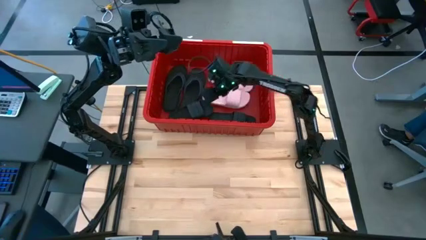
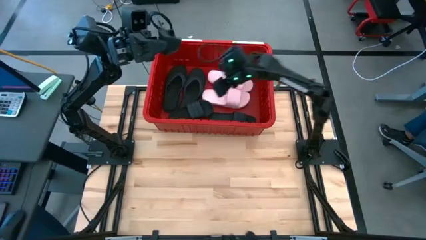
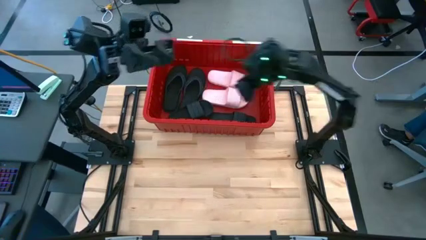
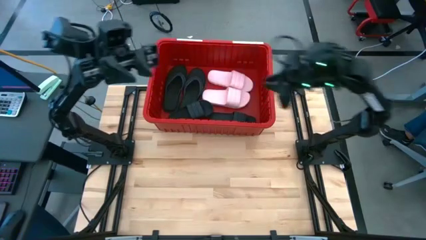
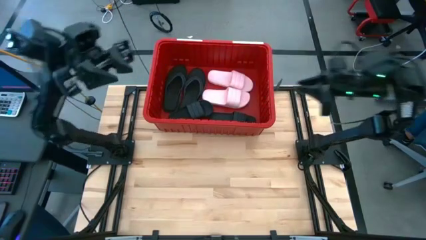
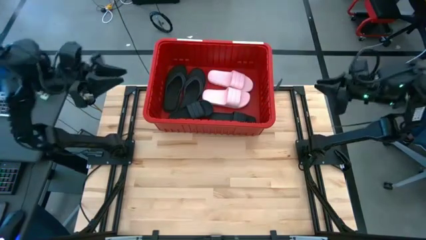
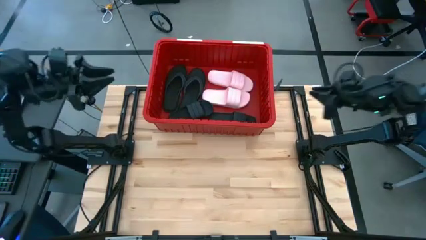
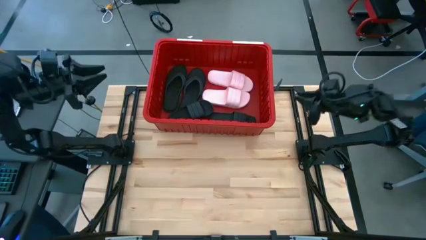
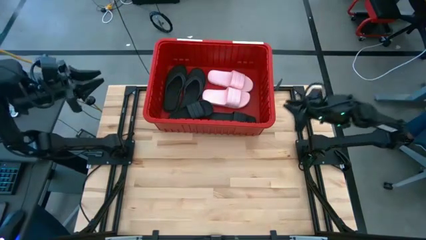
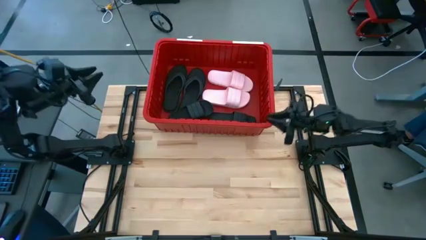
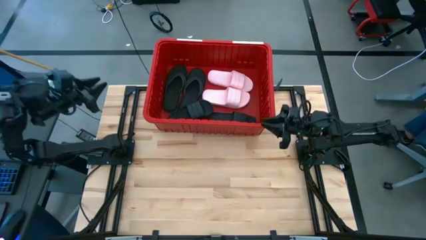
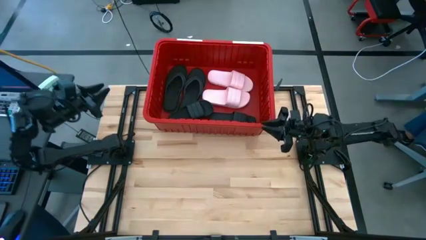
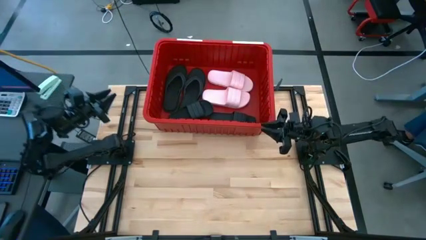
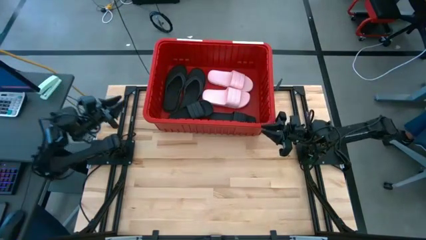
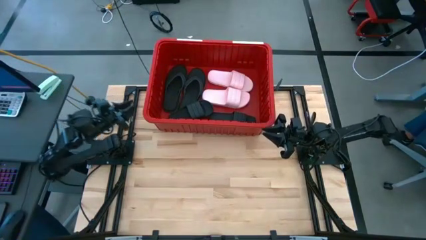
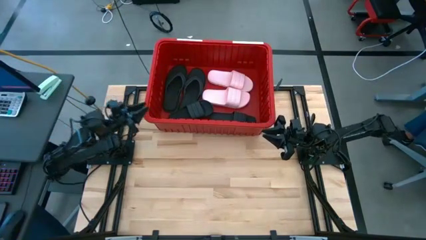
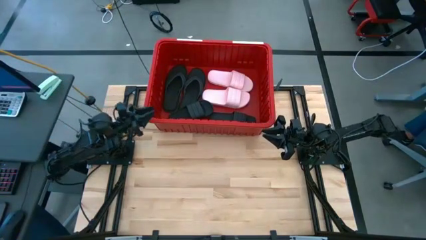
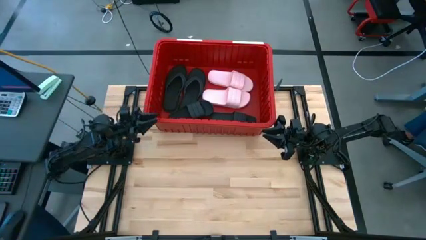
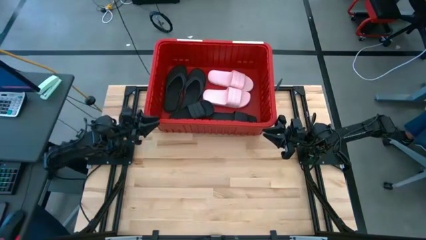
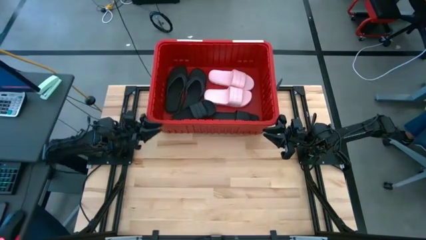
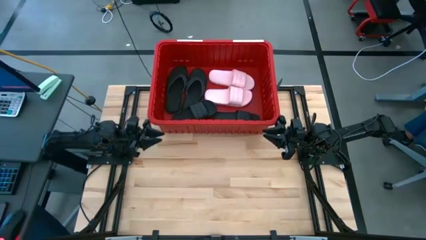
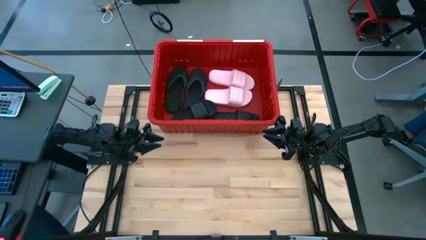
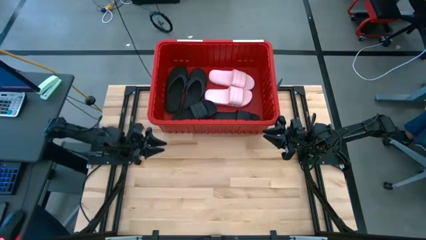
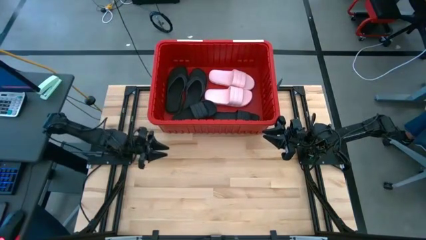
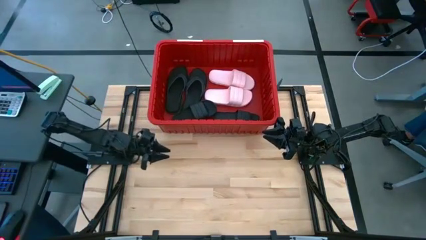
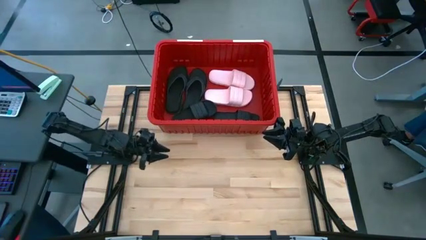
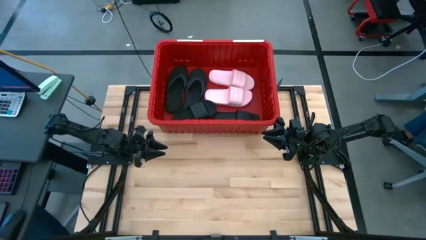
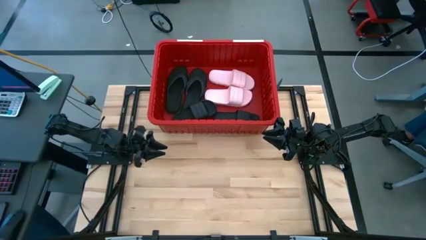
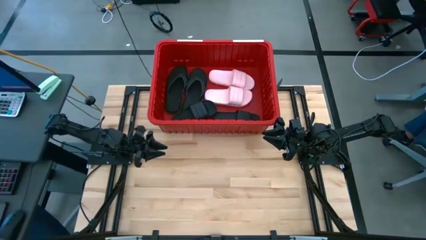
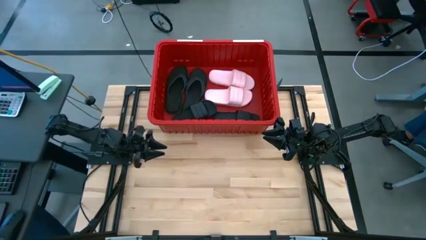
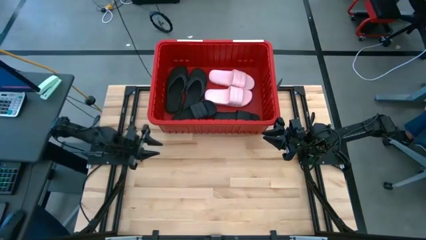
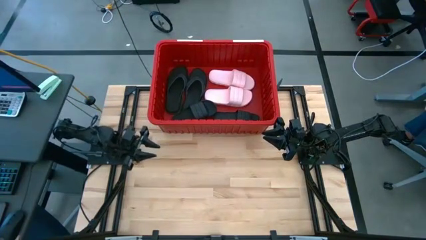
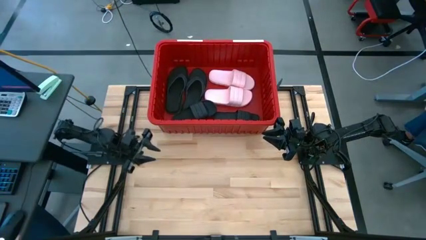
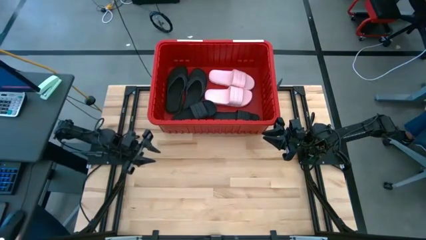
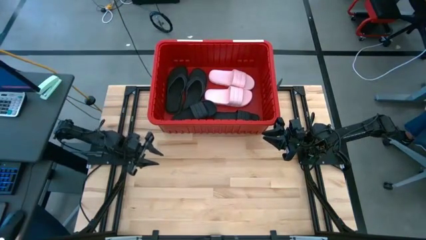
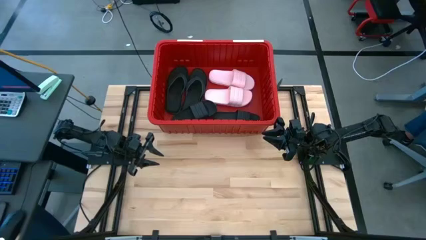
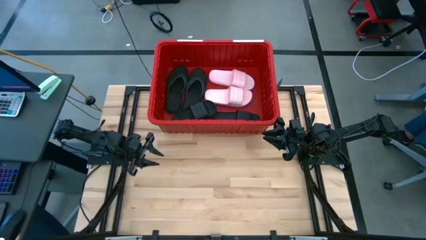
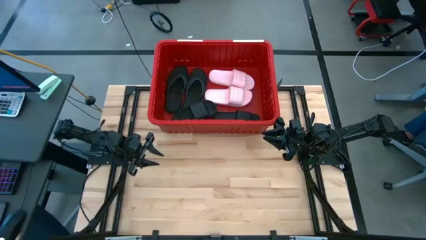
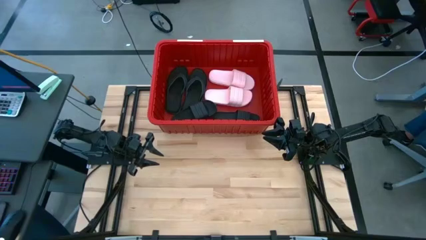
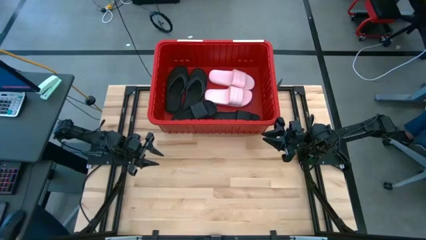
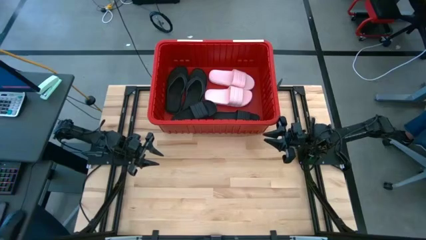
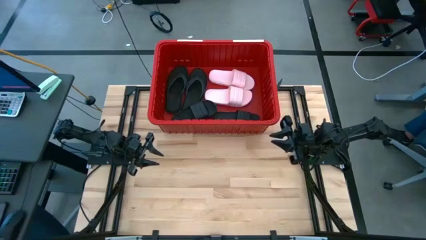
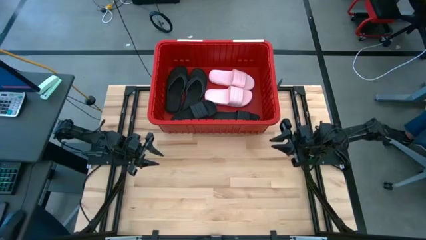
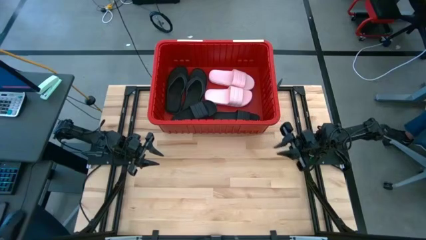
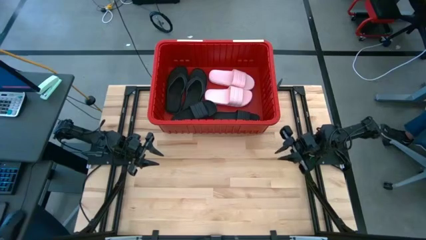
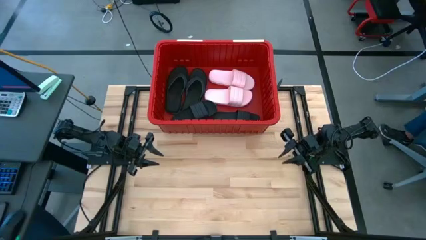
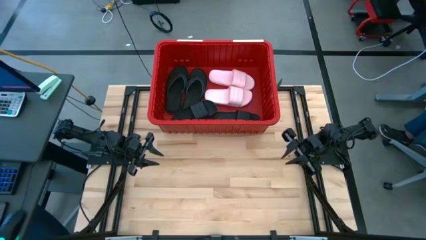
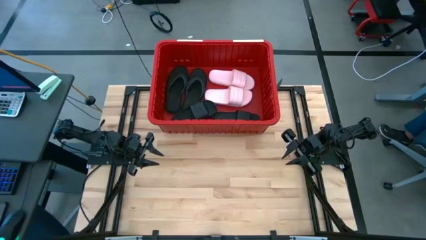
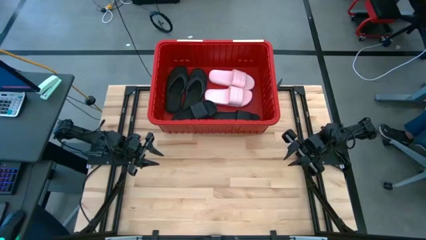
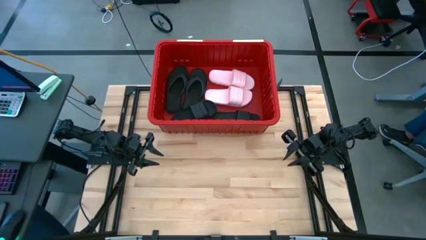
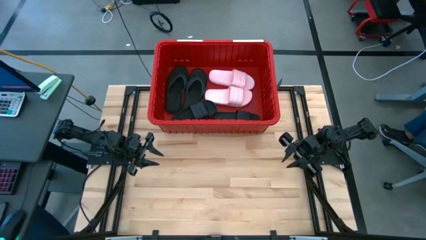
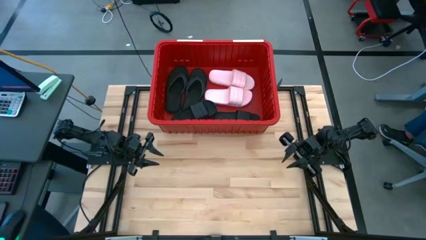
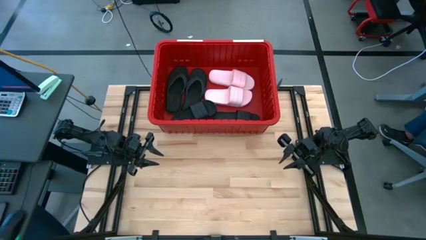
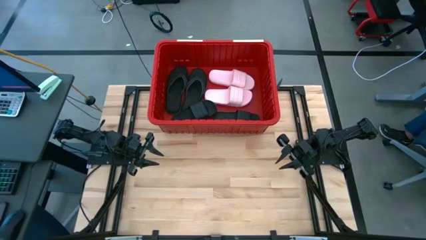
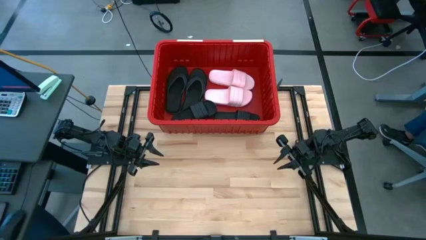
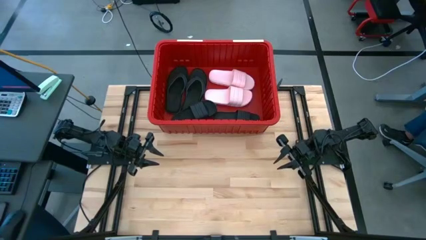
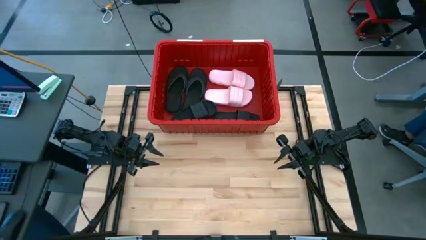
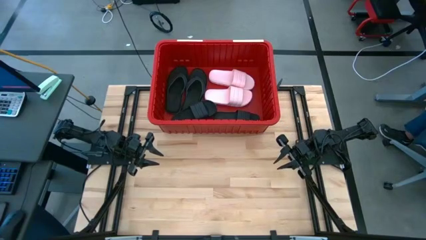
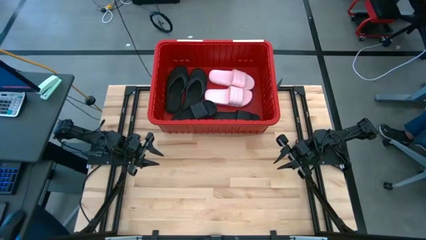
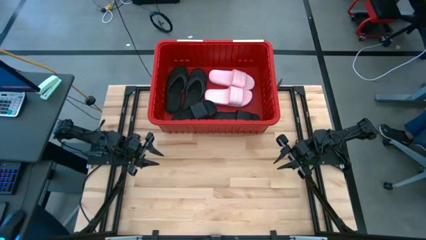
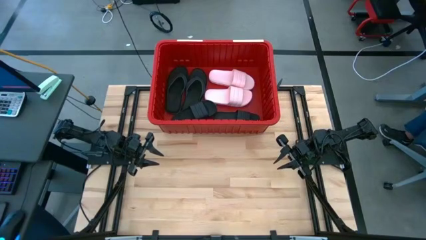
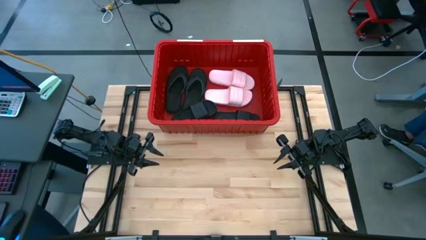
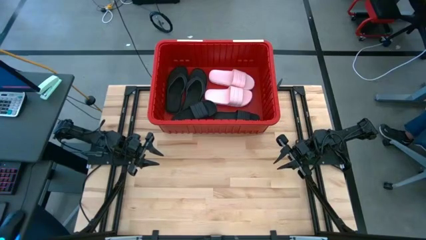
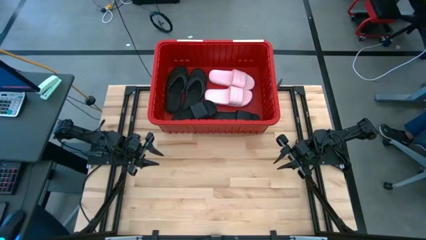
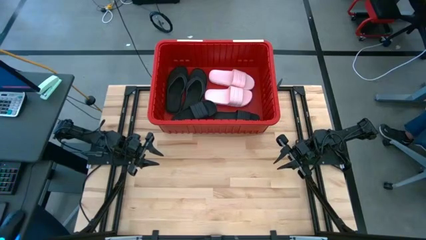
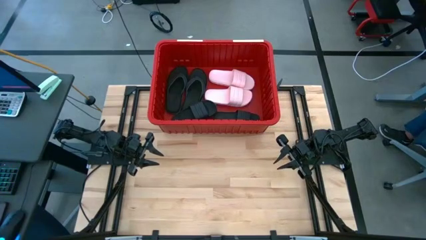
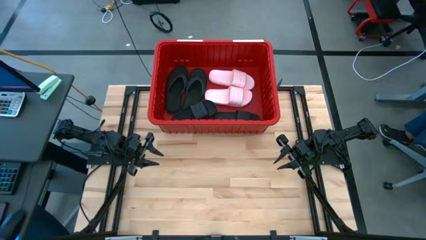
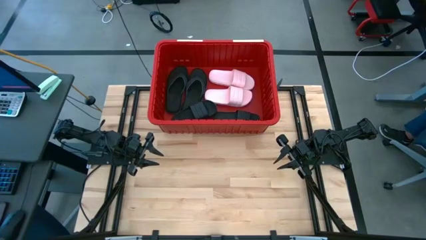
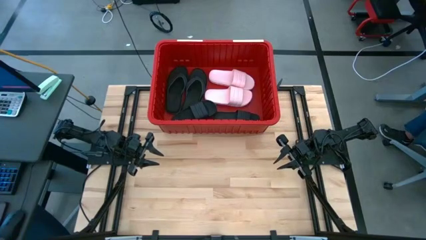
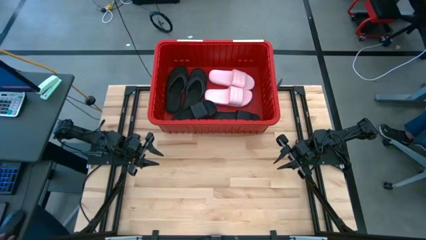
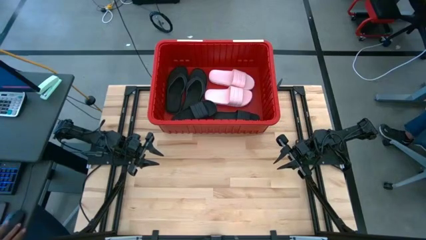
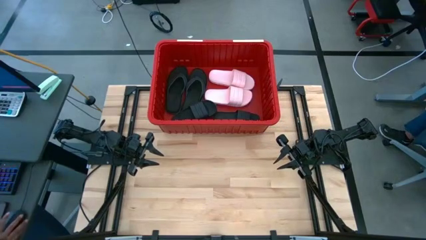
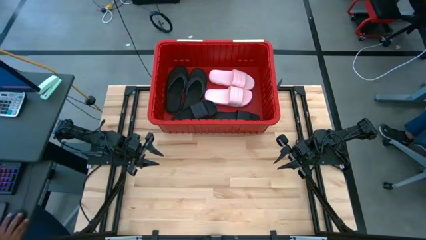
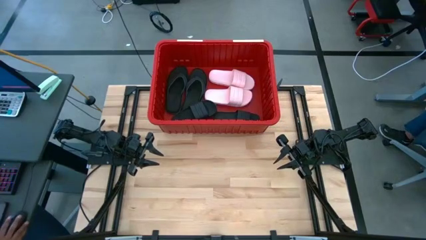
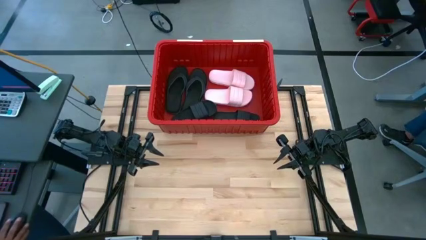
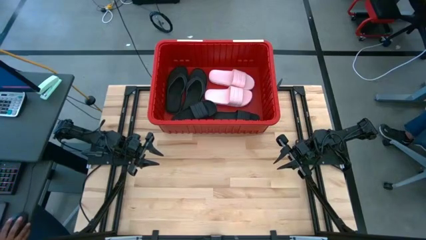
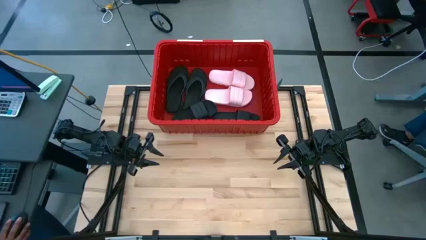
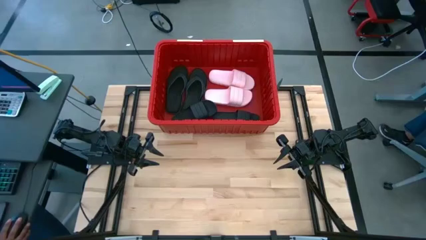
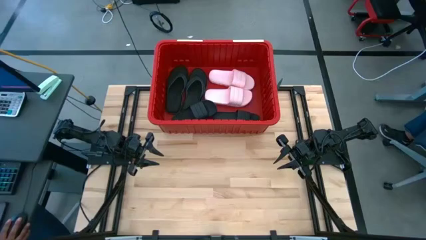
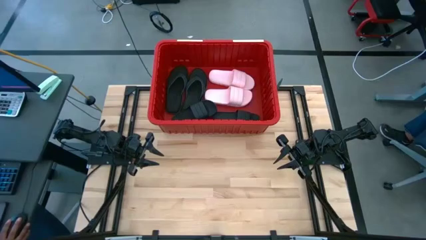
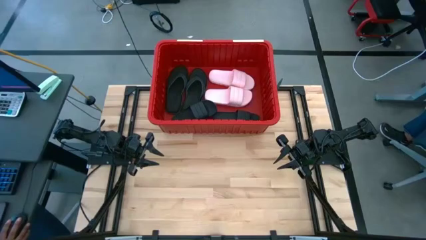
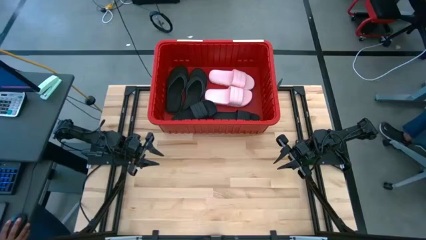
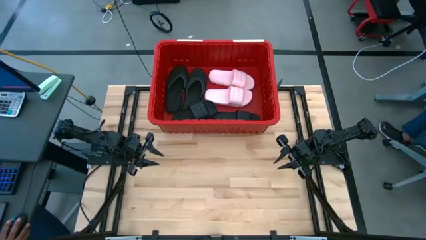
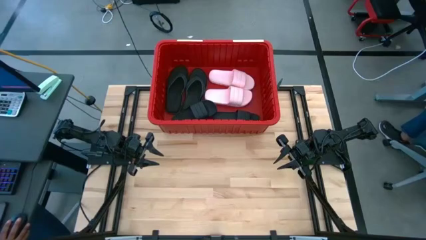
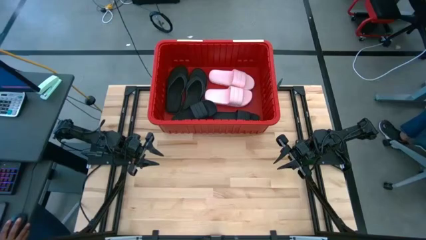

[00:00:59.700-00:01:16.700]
Task: Pick and place slides into bin
Return to Home Position
